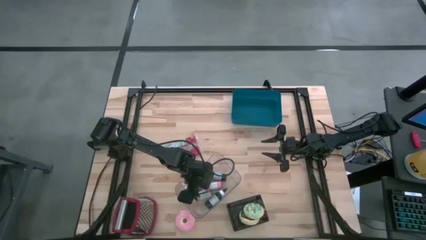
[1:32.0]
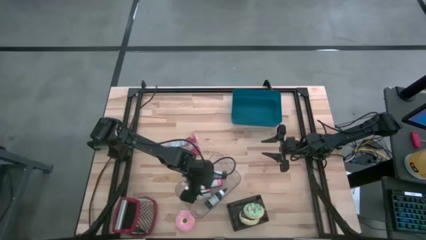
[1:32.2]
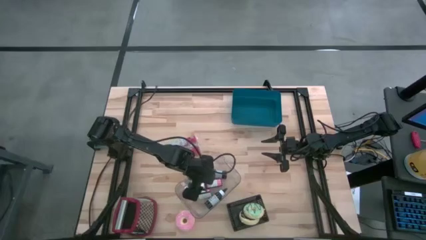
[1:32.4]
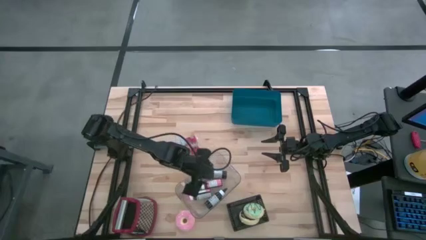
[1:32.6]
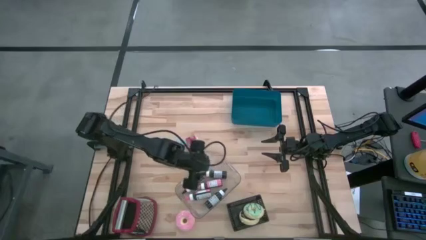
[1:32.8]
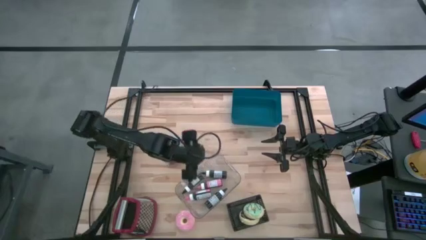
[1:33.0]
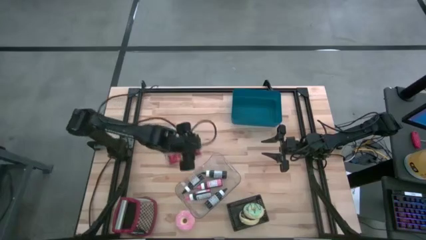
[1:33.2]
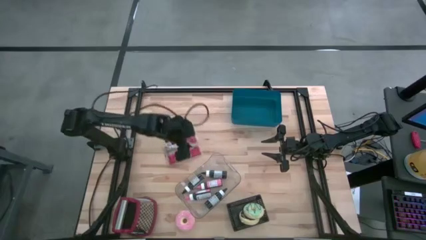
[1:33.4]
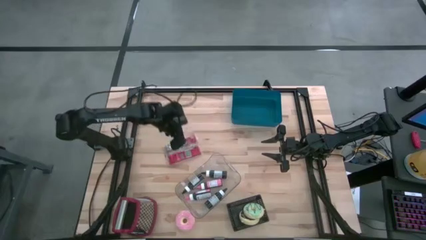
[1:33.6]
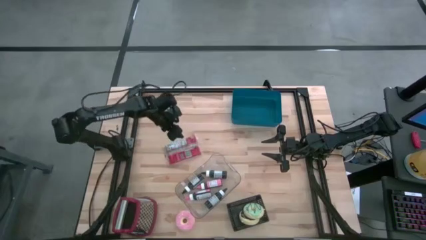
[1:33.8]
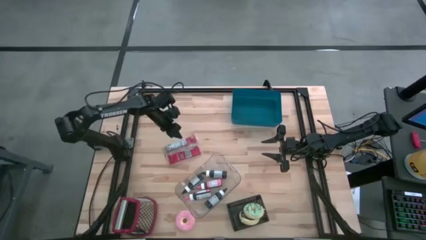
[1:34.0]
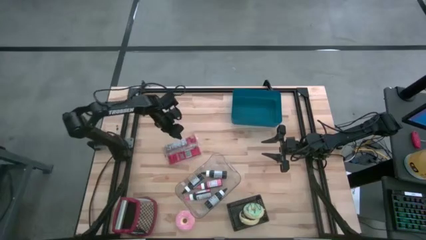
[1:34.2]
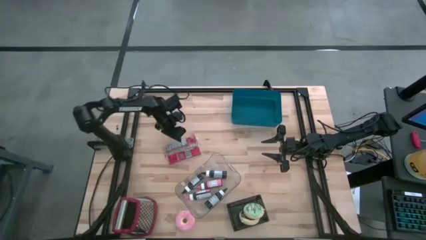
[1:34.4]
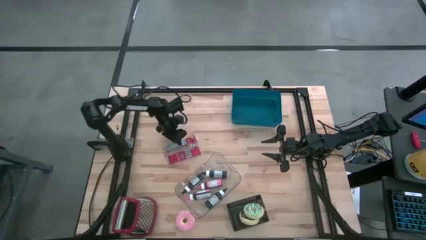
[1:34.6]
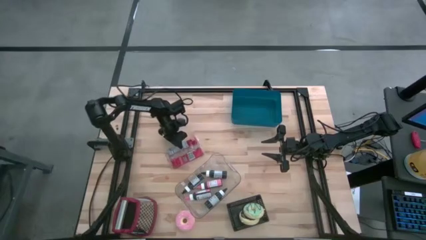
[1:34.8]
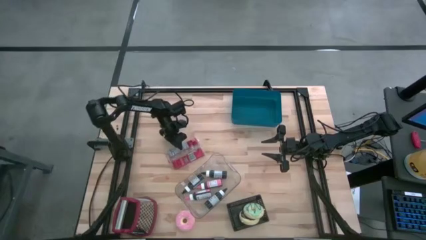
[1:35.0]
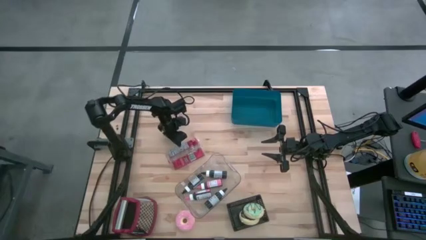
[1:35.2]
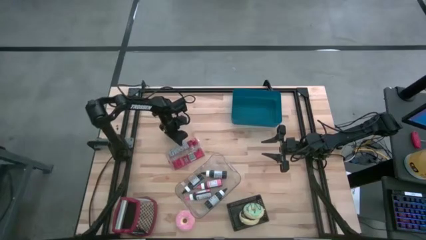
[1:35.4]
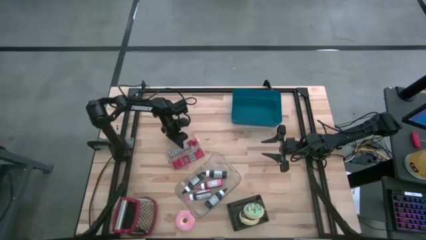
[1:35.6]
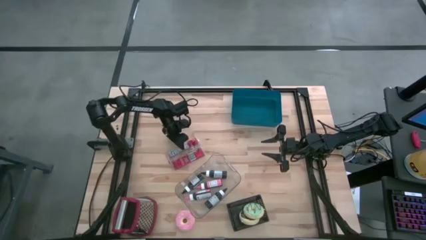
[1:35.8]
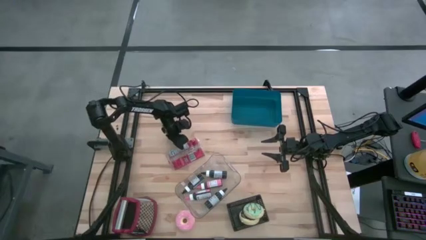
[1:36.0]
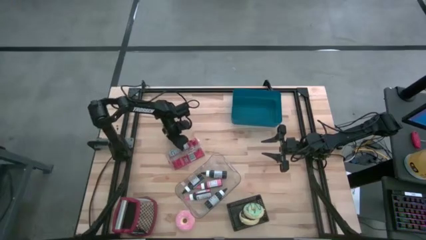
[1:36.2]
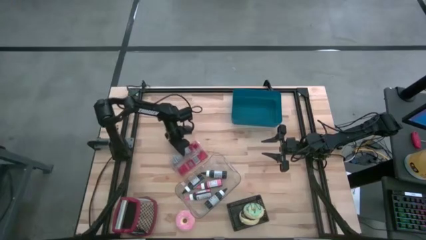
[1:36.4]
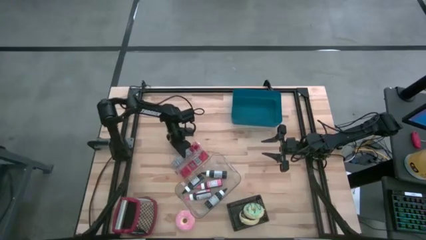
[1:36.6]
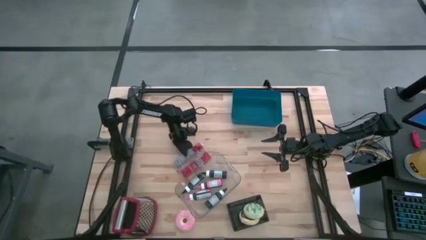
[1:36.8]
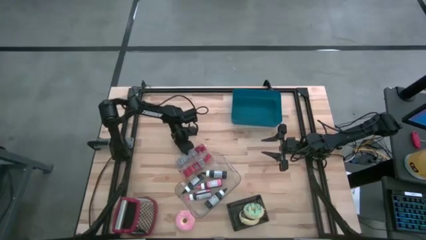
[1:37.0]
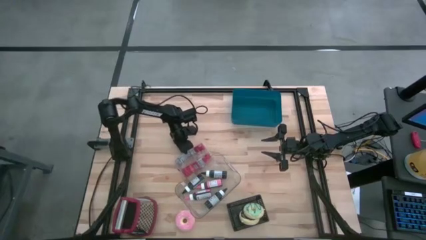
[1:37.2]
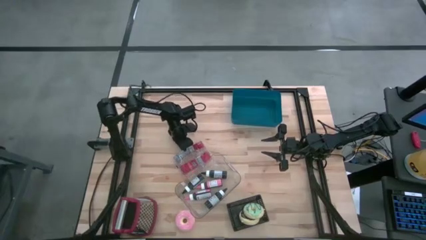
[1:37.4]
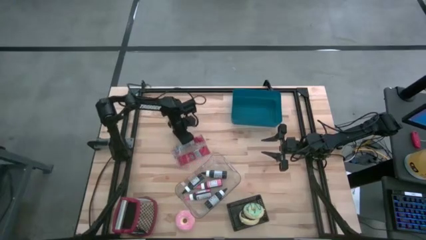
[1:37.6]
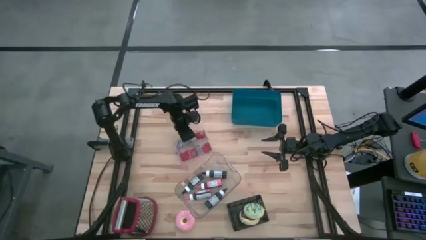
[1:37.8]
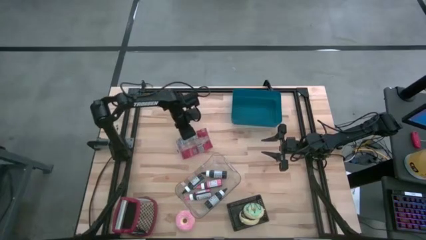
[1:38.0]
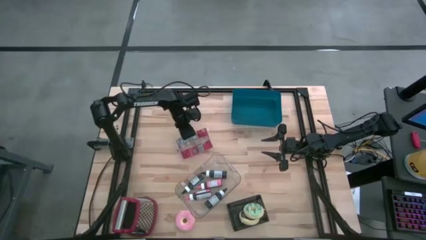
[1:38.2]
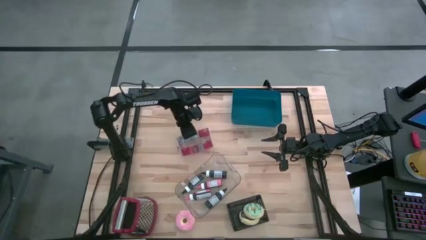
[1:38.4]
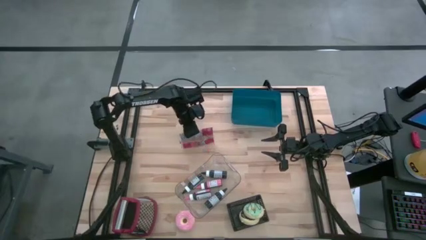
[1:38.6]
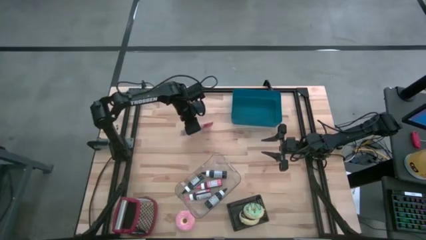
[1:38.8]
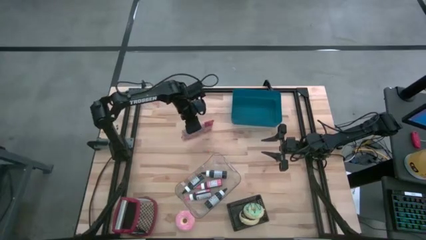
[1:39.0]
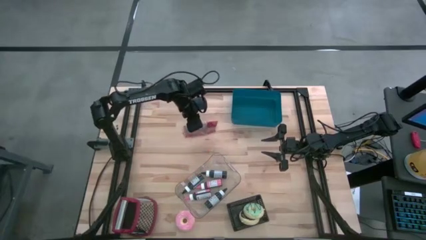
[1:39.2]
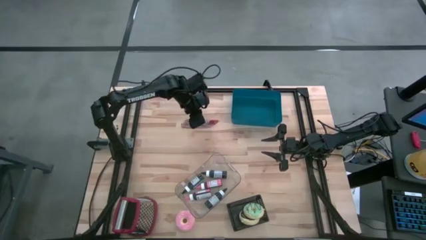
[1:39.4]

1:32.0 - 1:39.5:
Put the popcorn bag into the blue bin

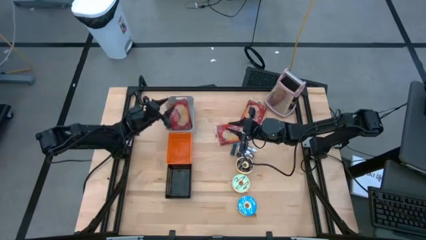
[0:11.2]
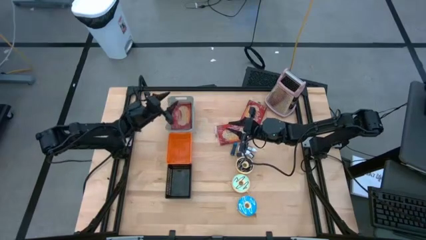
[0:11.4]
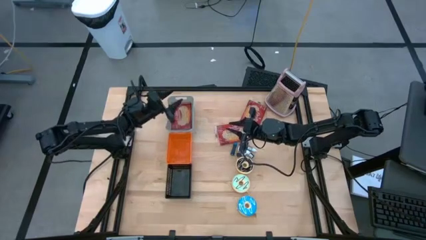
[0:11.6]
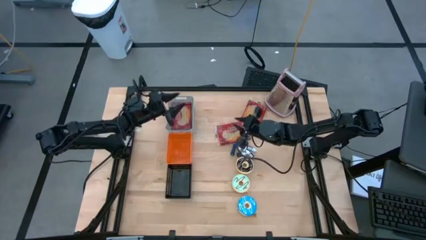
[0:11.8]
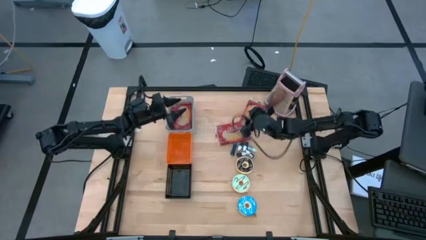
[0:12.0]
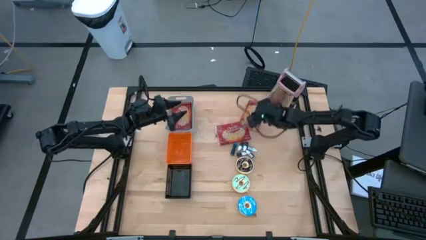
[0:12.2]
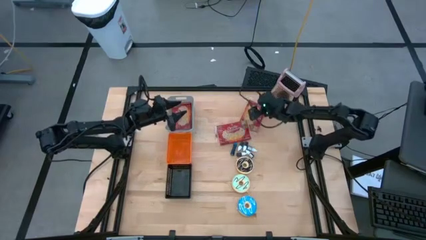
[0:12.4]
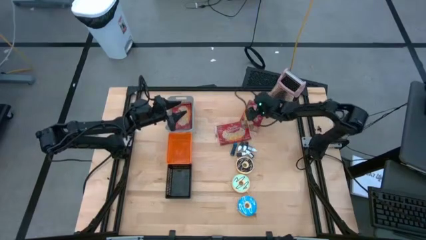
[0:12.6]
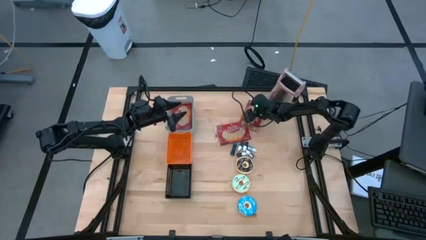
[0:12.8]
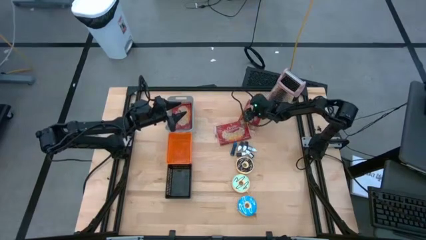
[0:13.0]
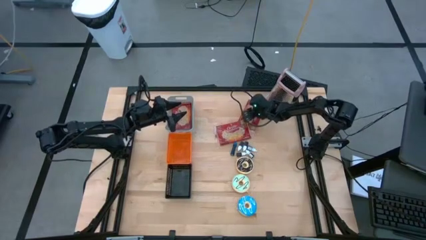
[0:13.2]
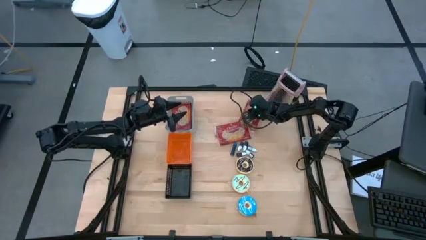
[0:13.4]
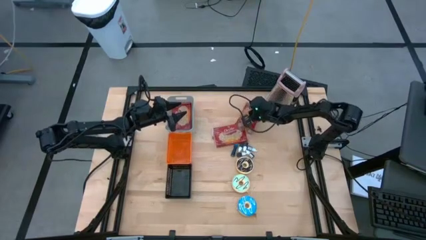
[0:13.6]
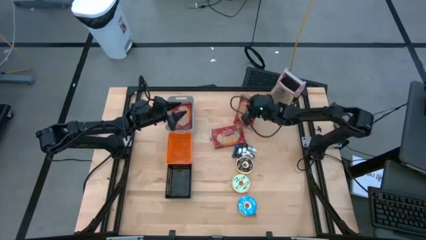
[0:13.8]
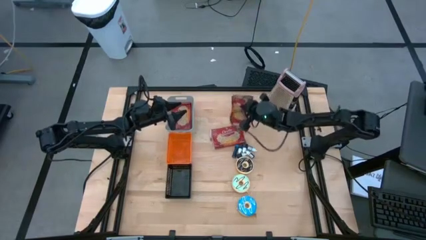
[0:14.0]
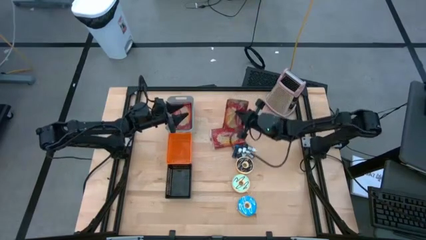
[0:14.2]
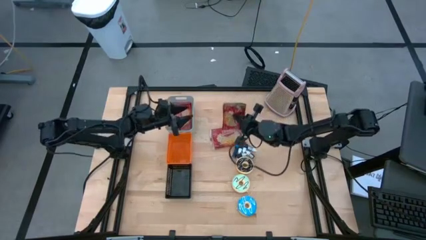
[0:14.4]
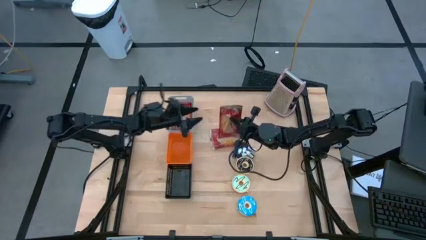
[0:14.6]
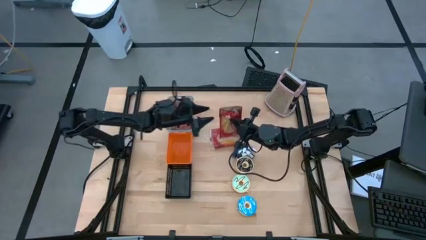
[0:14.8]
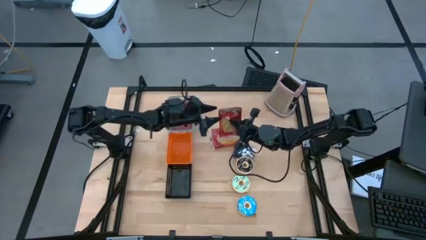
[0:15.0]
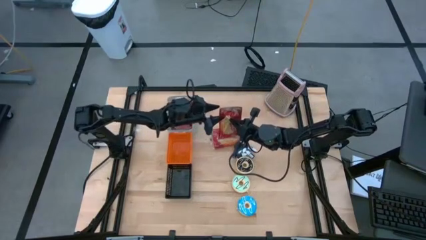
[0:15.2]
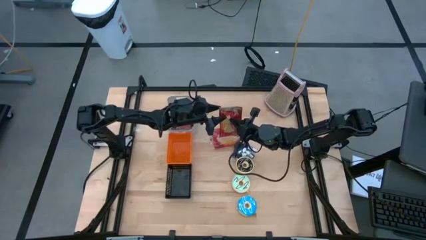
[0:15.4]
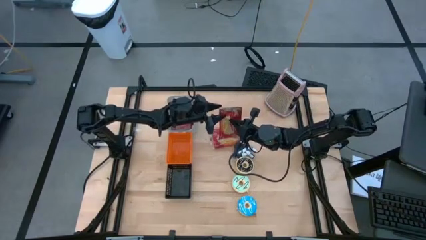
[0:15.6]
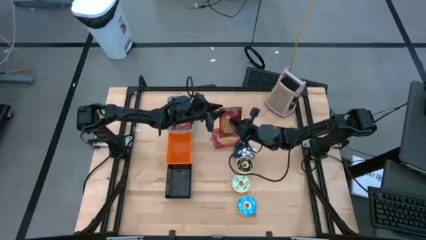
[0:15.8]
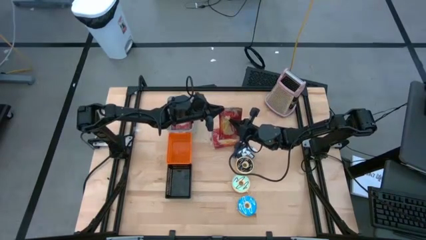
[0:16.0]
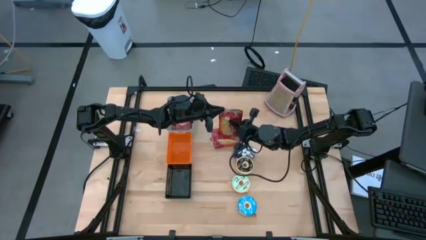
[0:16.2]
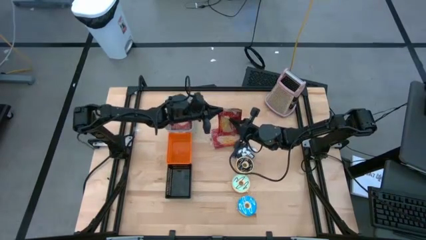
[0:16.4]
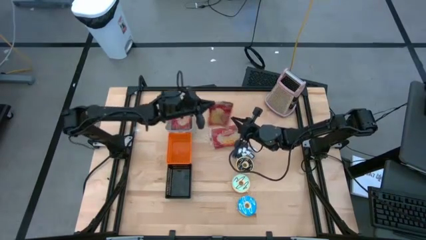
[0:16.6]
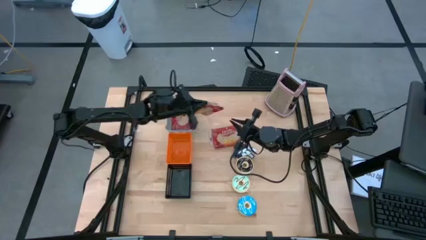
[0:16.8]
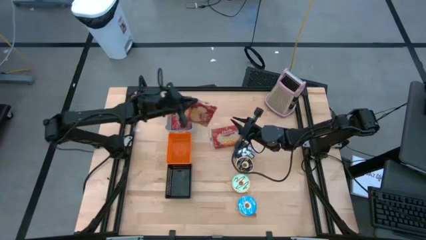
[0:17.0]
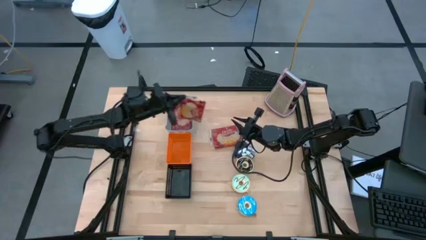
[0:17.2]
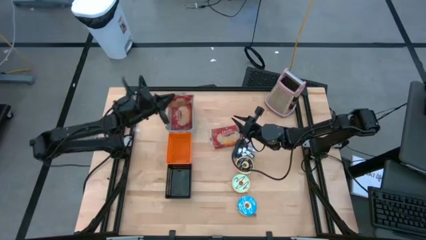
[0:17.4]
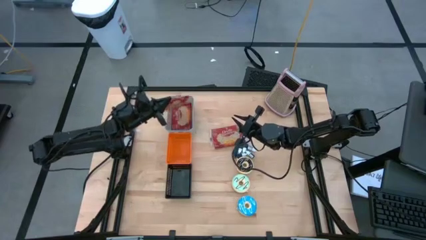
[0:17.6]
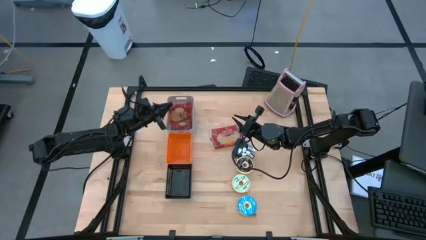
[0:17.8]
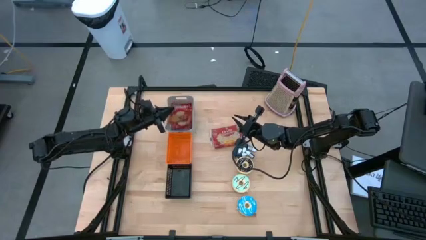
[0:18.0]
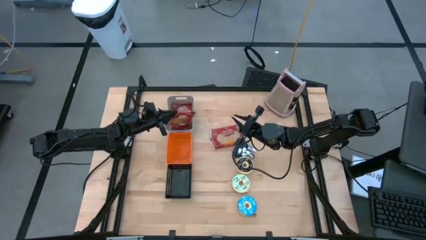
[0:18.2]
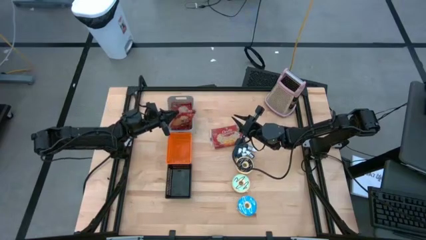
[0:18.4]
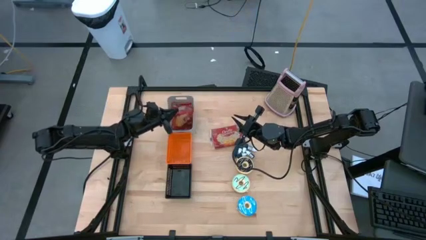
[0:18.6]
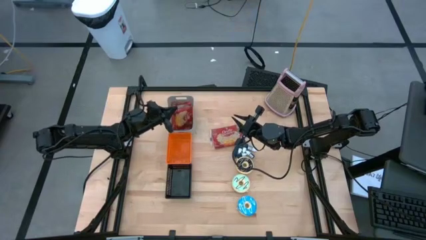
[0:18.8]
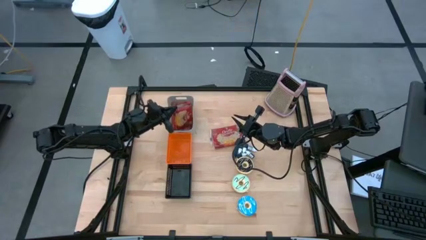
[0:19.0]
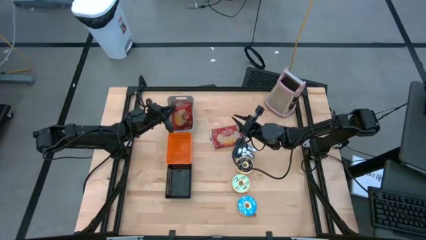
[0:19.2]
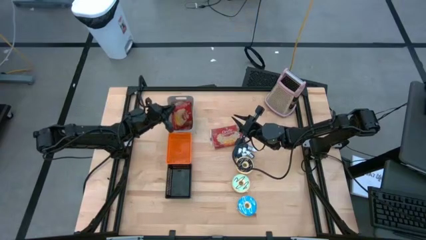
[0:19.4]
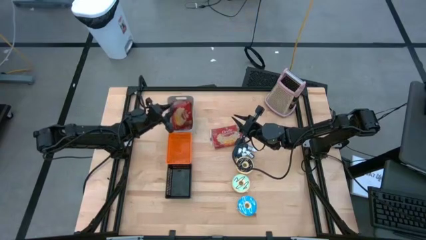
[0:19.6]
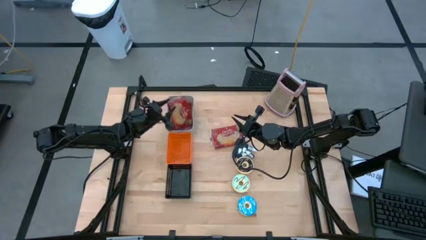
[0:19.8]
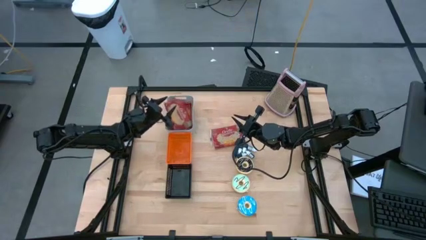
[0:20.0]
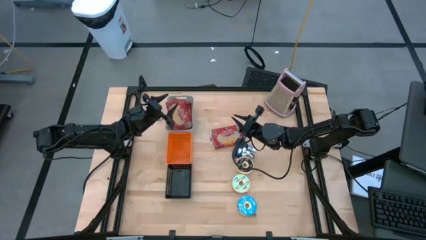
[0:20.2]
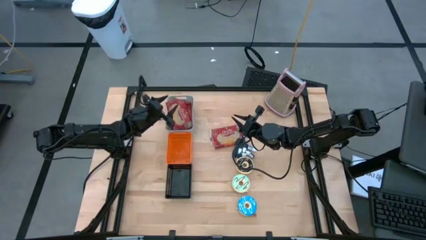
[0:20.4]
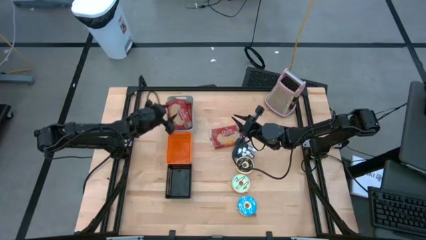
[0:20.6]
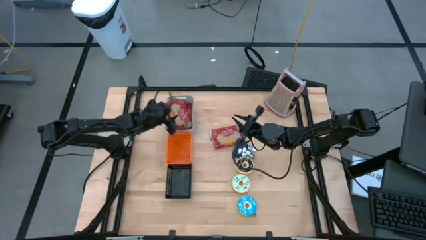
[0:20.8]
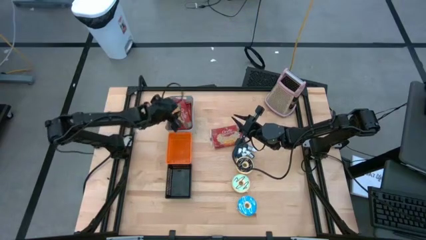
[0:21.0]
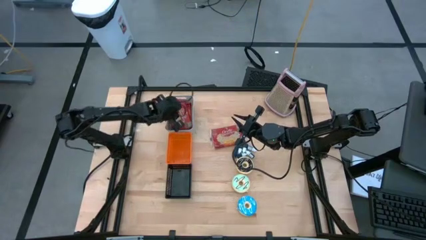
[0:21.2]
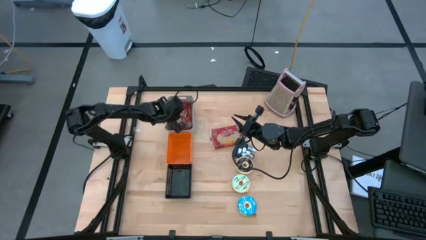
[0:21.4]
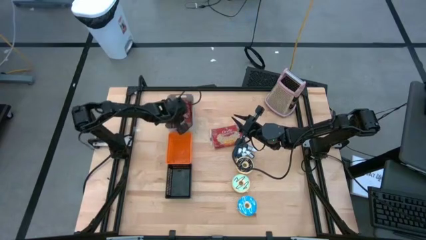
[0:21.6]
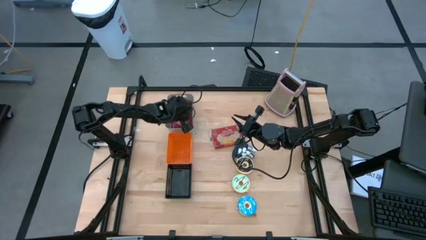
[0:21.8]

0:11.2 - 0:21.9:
Put the top red popcorn bag into the gray bin
